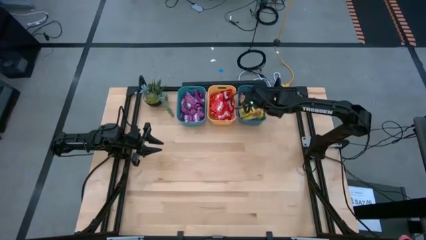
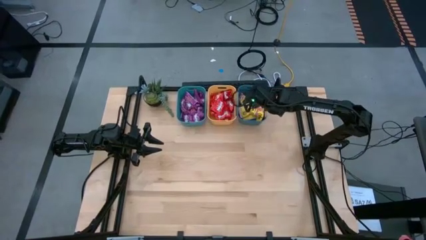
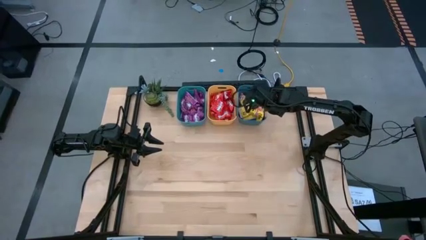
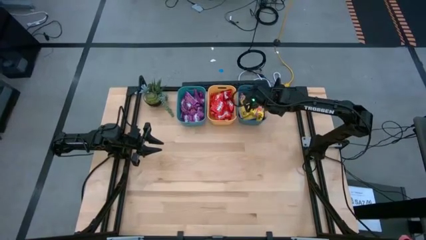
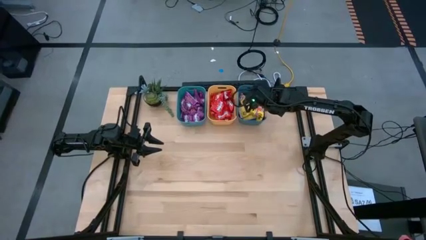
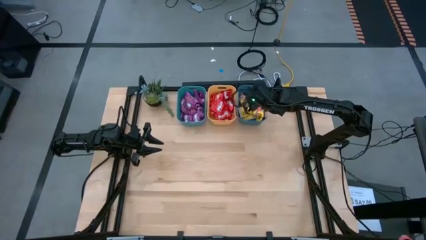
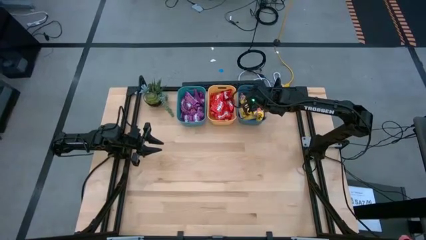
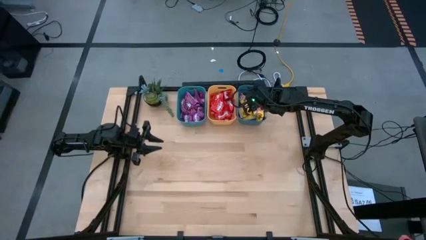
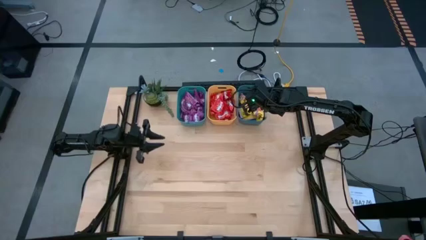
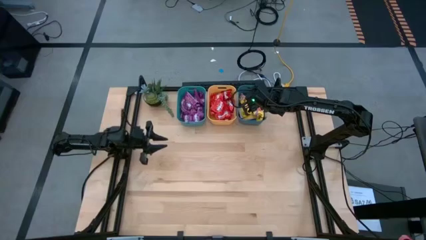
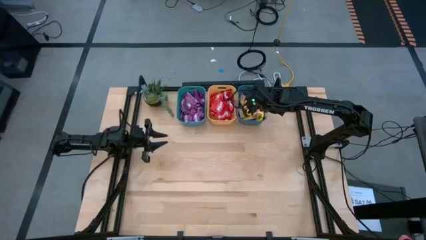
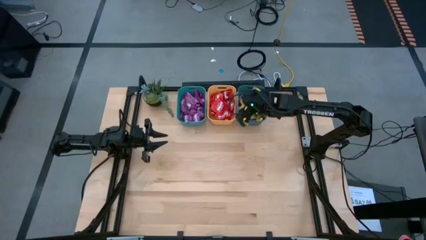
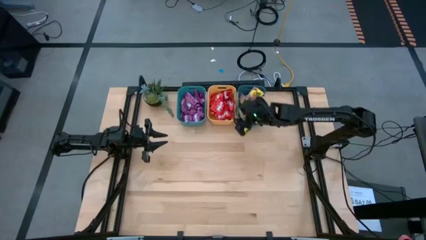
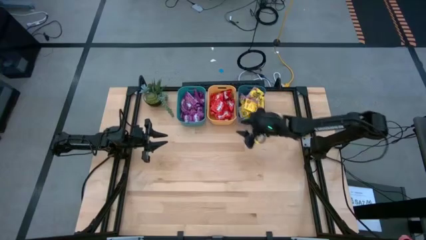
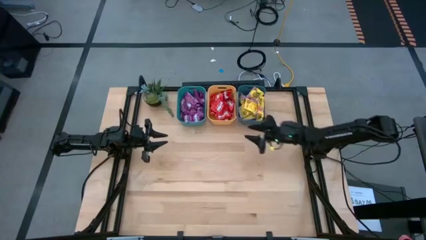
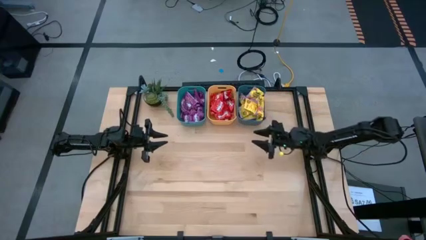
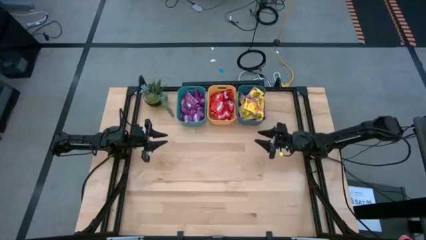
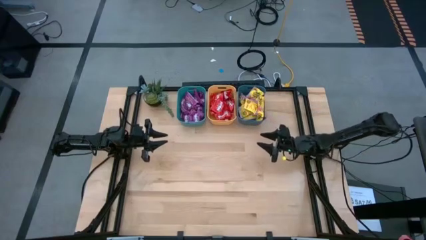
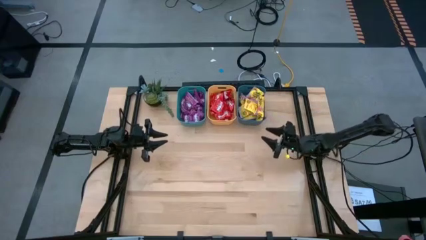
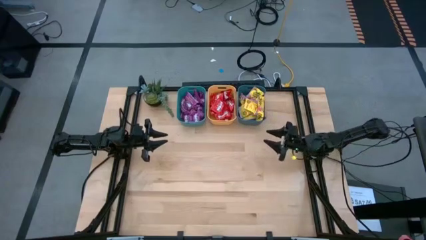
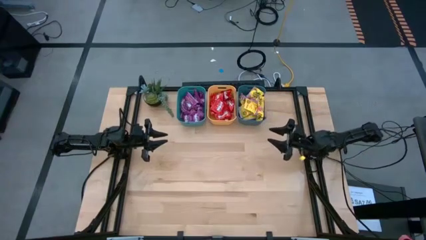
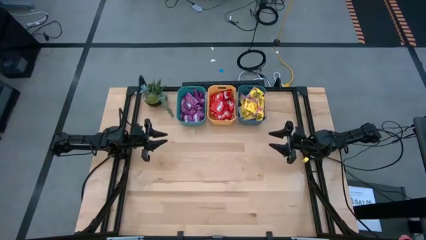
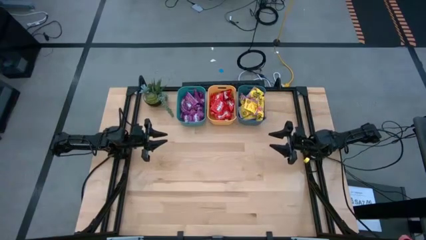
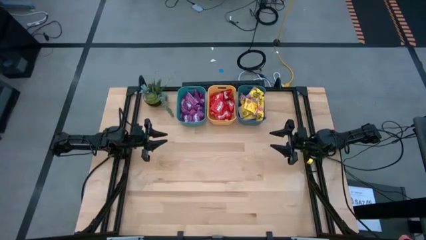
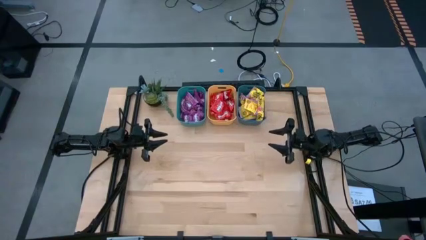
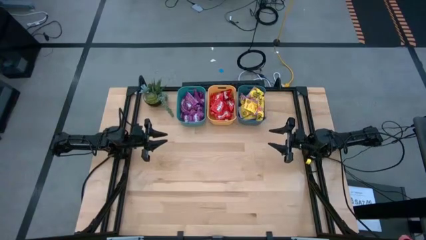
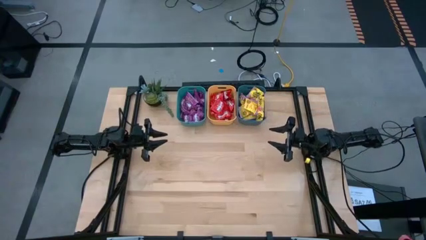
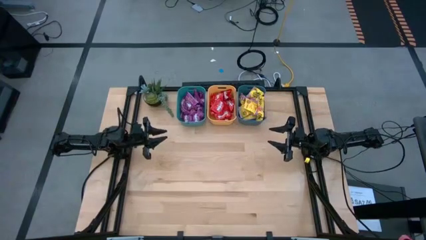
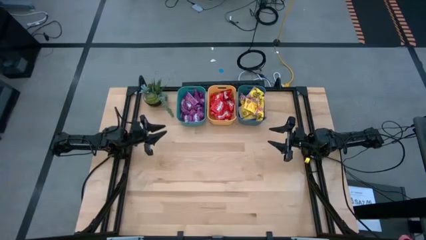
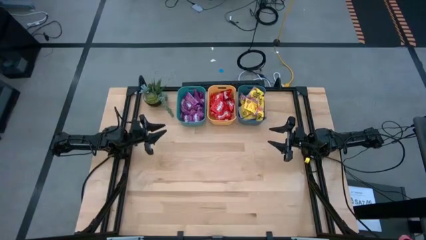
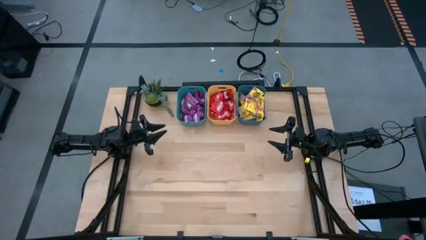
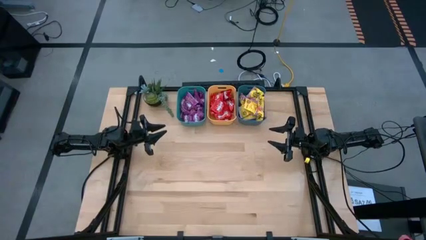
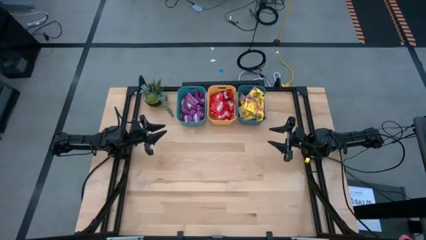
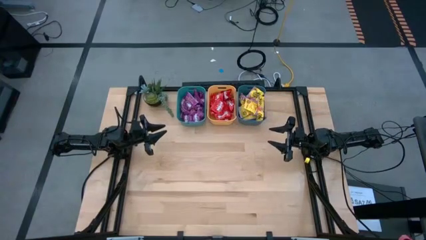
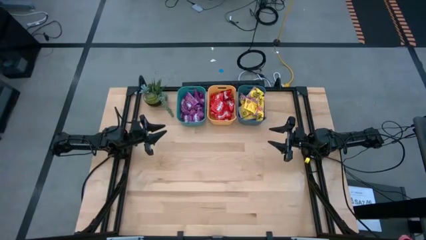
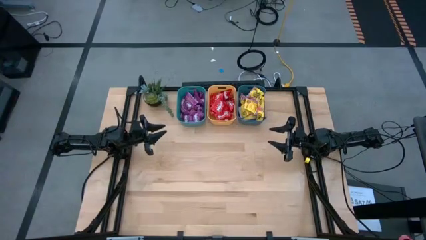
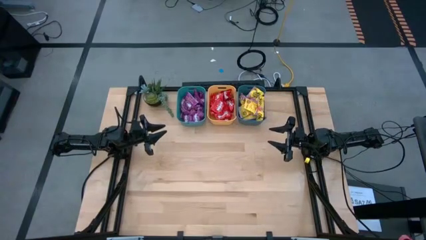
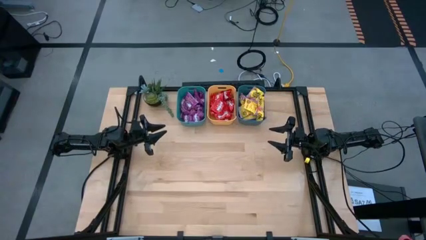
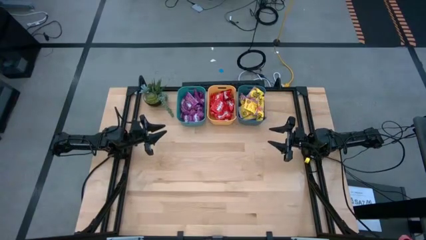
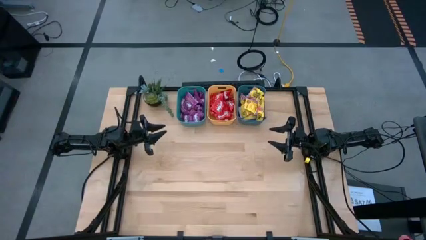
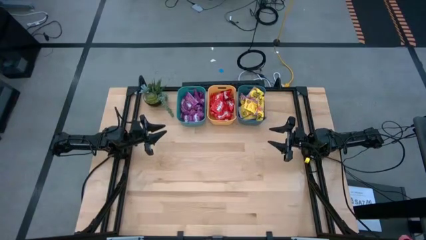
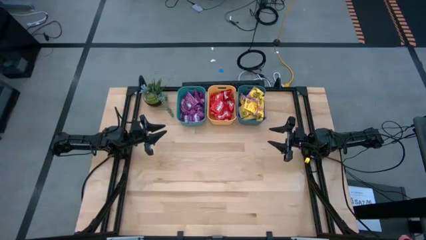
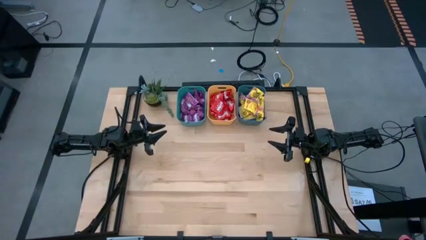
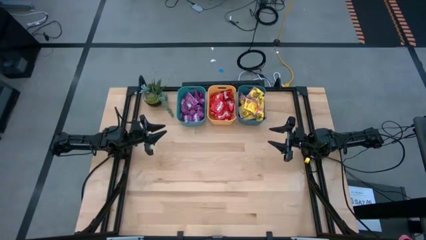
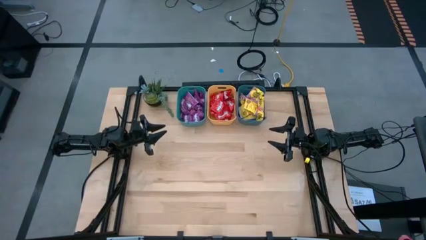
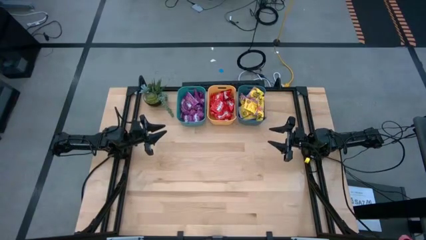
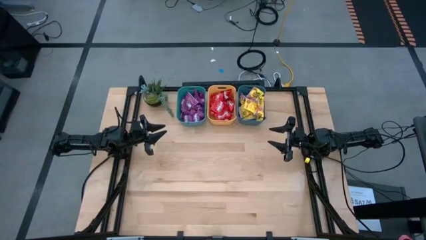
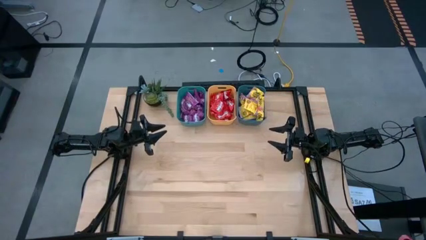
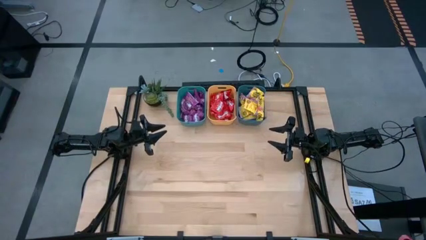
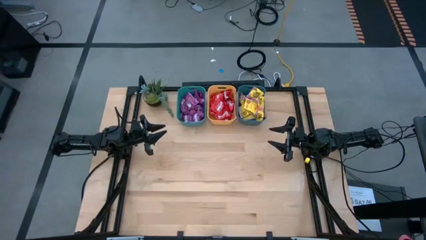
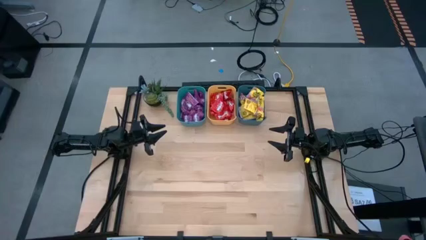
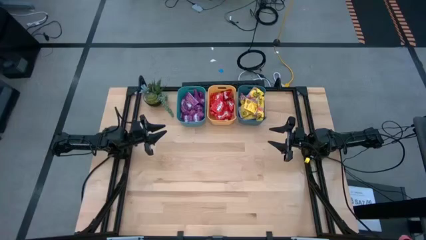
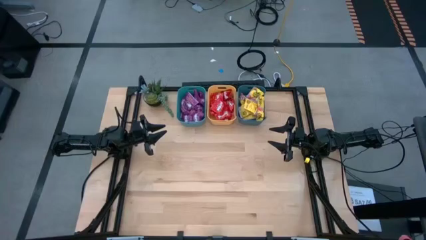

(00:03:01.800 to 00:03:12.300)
Task: Sort candy
Return to Home Position
